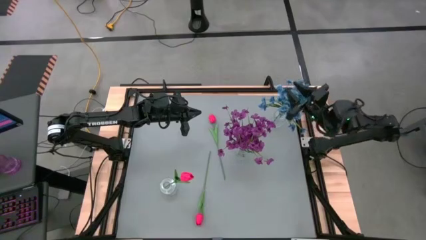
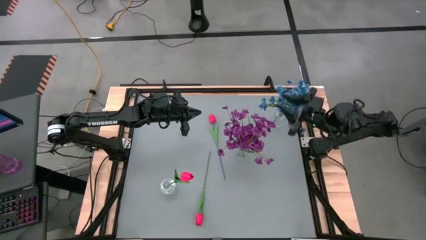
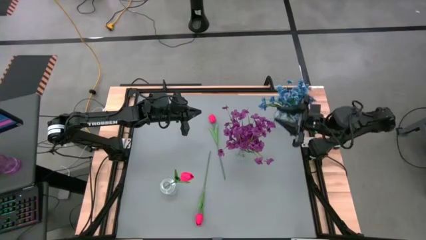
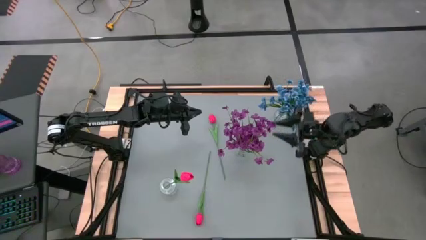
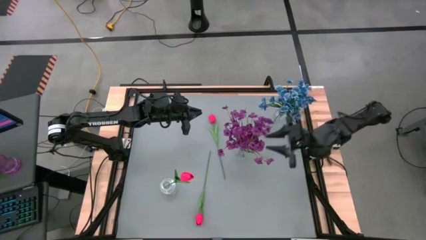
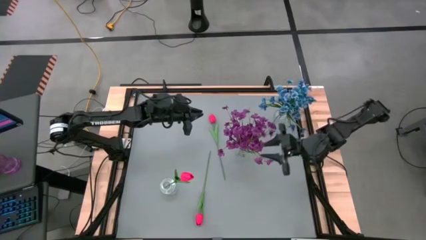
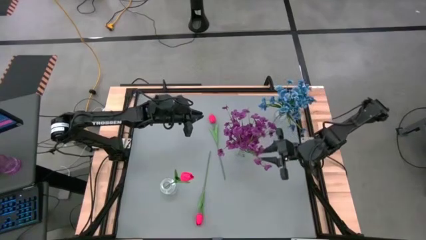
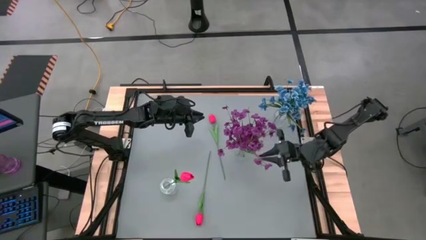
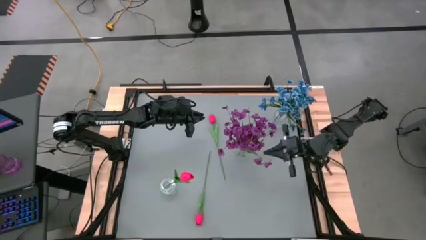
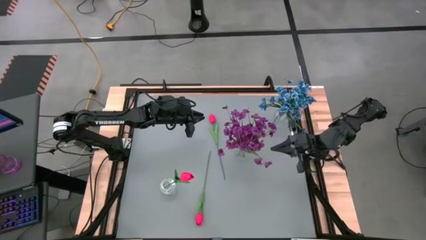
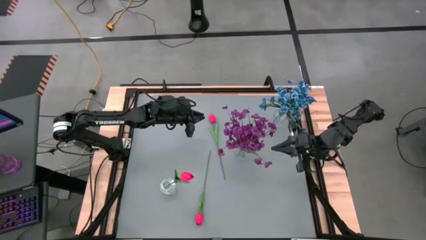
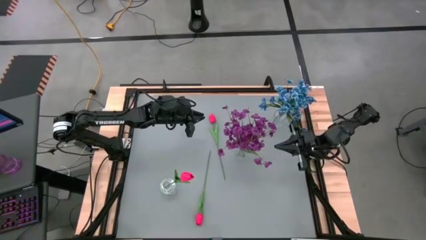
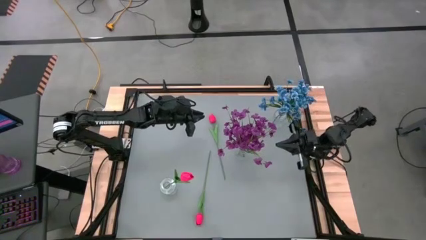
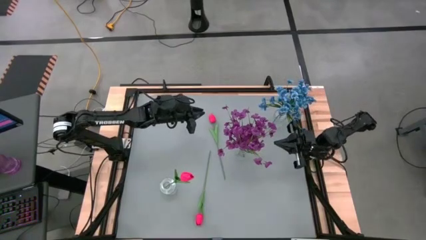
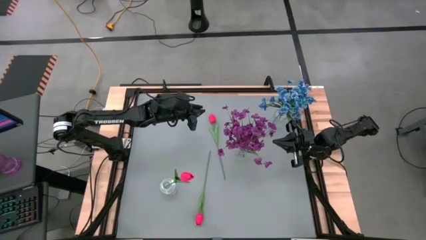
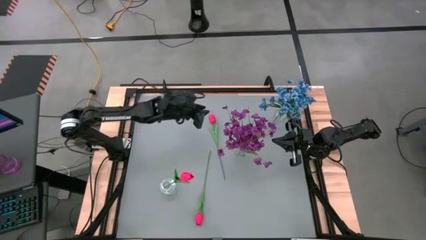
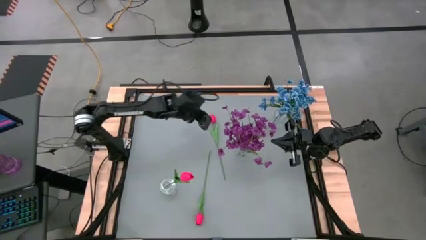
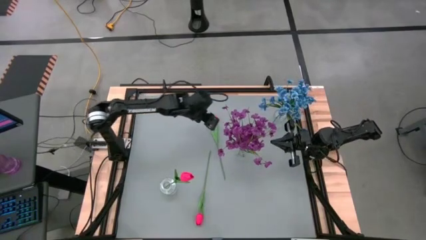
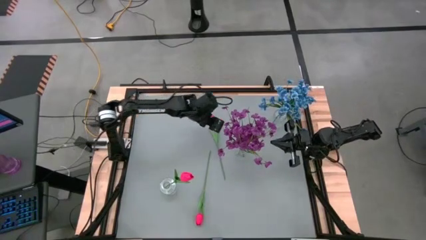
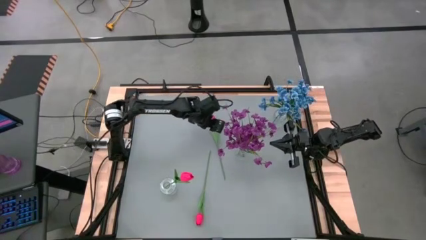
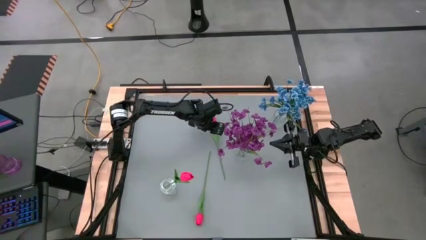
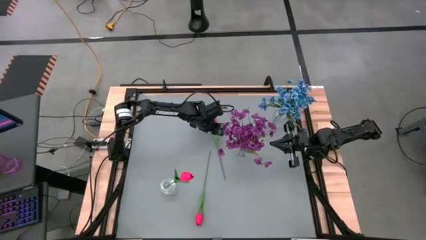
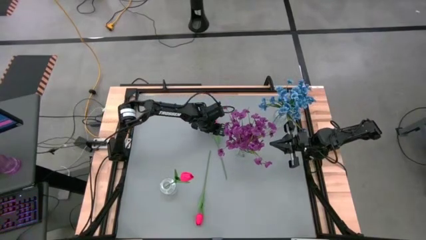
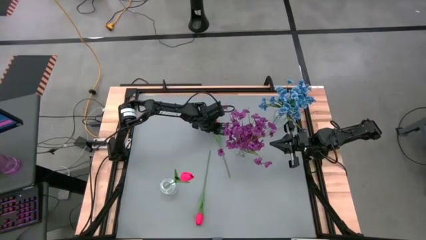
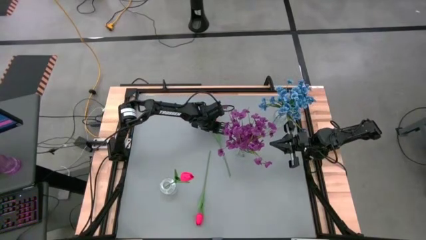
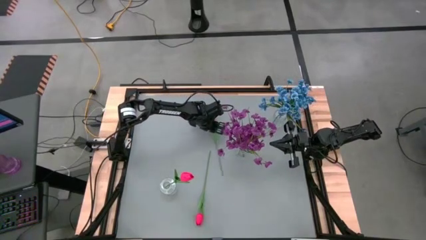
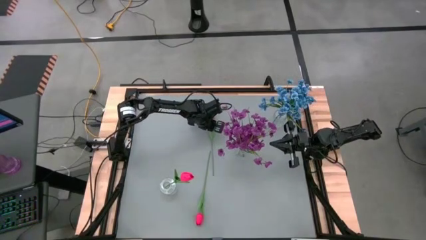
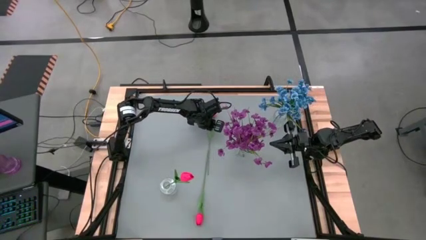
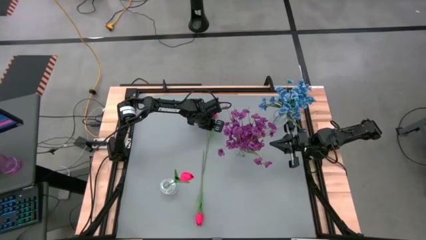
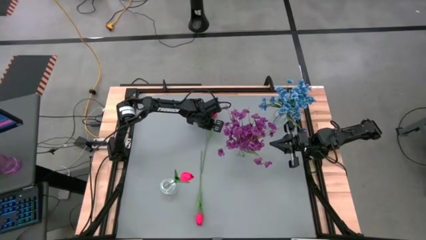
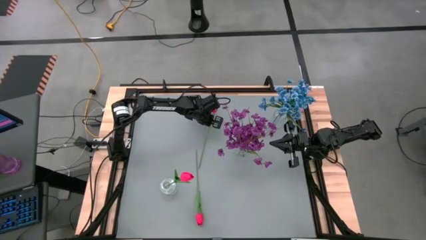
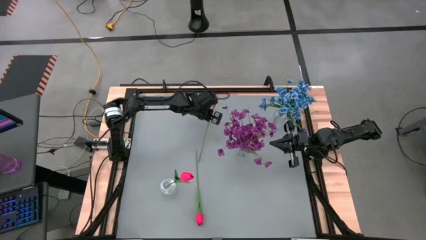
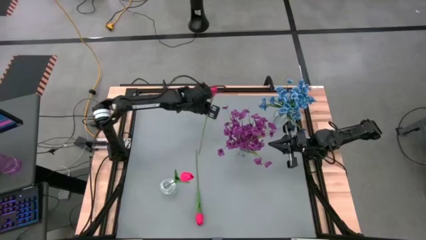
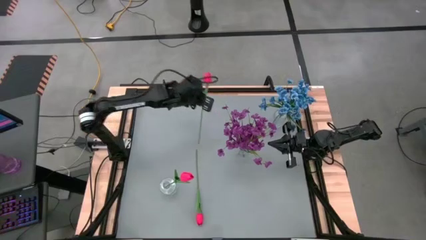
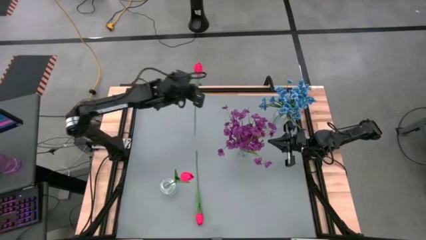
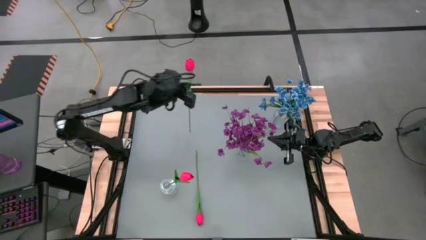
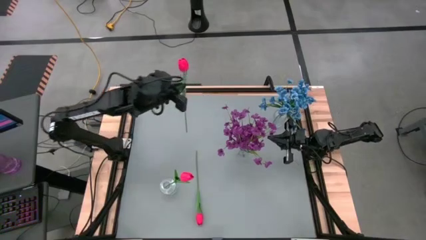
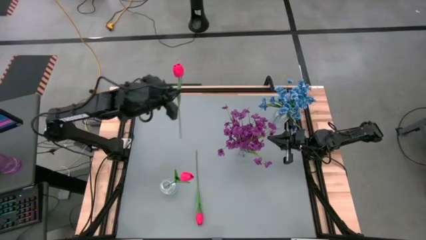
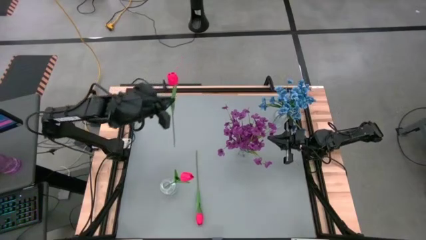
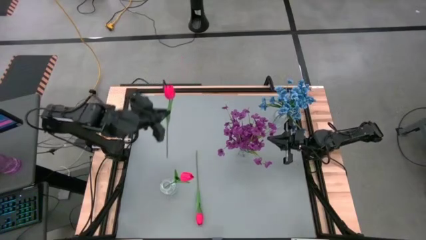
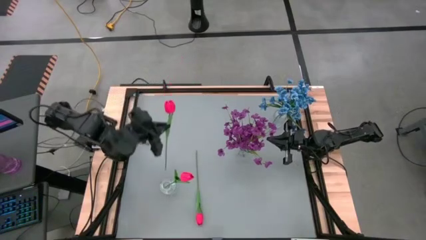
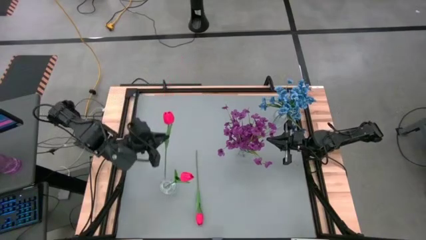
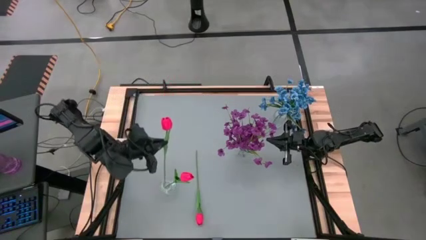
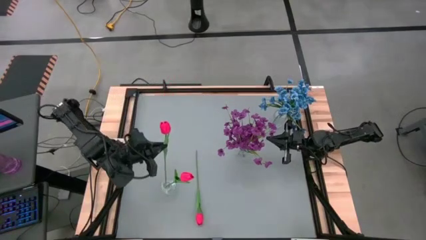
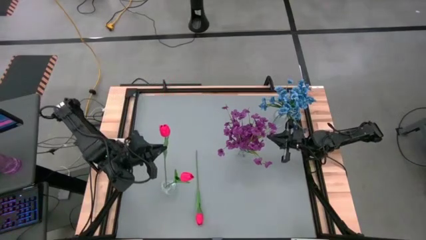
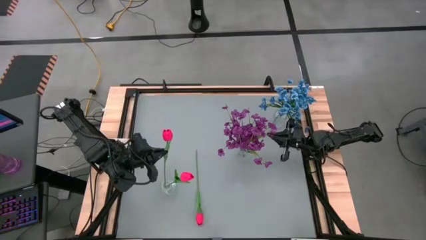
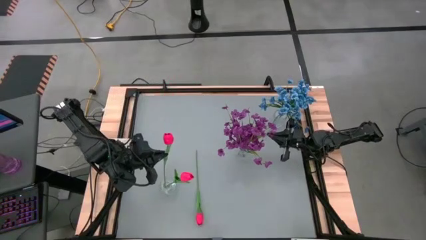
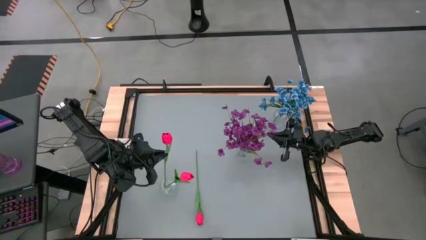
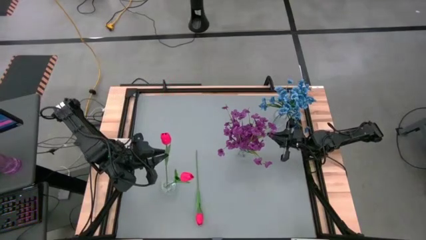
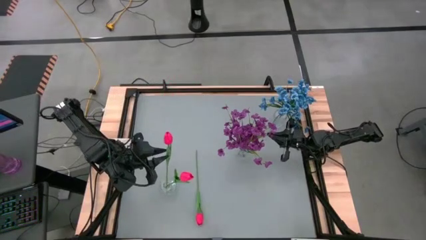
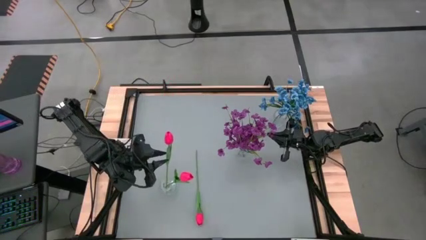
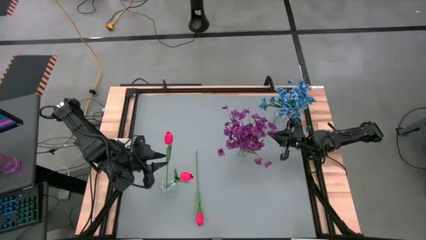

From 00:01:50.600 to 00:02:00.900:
Task: Sort flowers into vase by color
Put the top pink tulip into the bottom transparent vase
